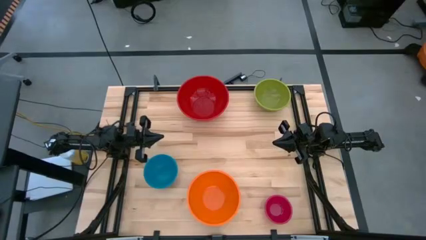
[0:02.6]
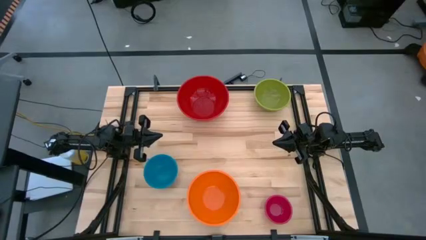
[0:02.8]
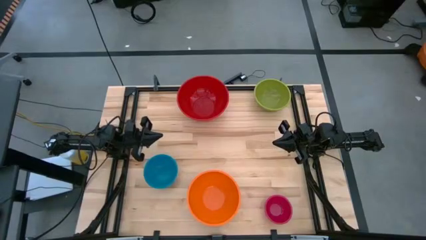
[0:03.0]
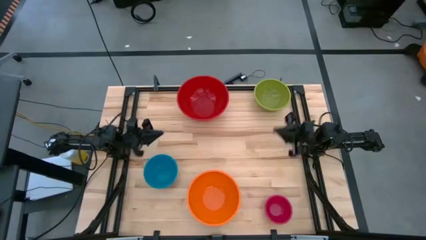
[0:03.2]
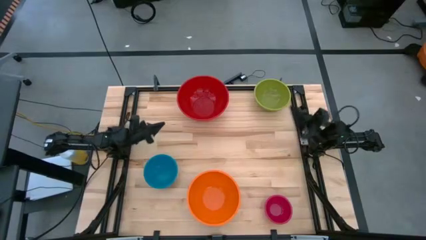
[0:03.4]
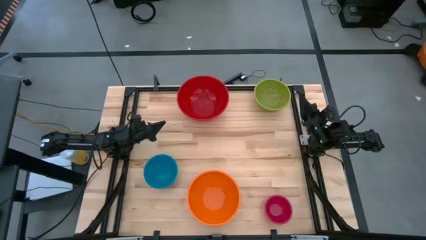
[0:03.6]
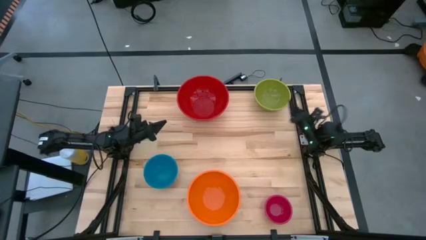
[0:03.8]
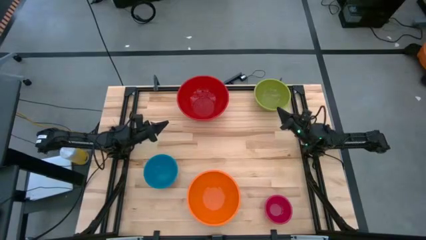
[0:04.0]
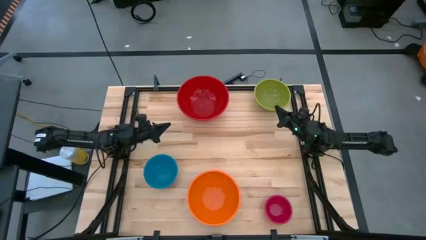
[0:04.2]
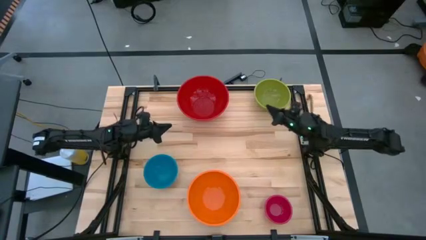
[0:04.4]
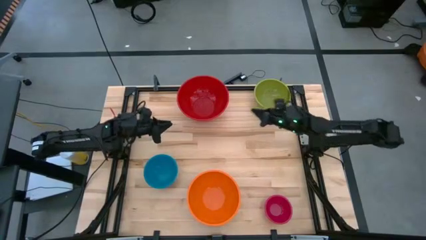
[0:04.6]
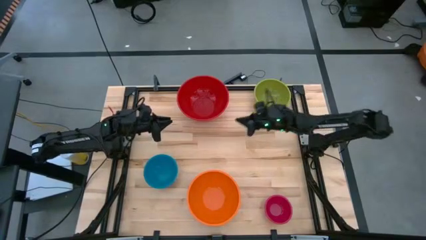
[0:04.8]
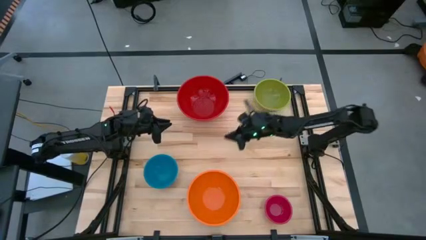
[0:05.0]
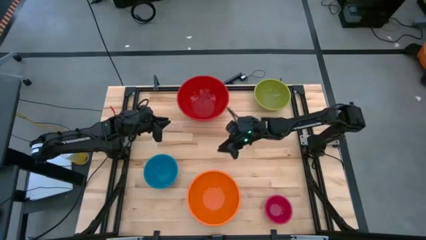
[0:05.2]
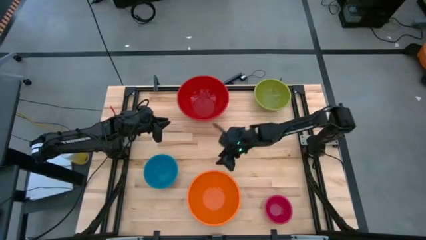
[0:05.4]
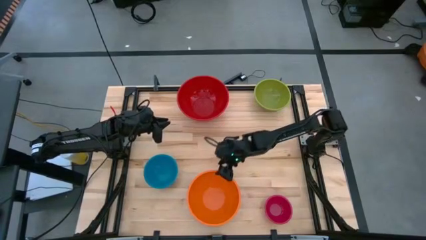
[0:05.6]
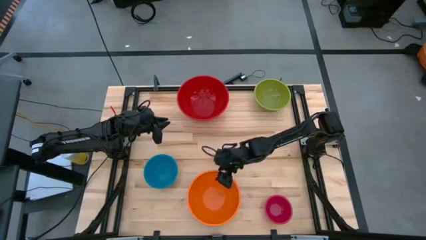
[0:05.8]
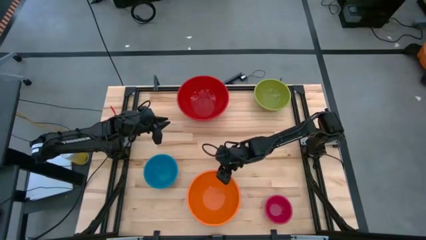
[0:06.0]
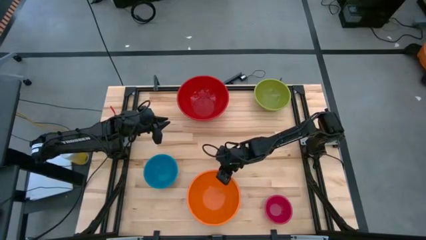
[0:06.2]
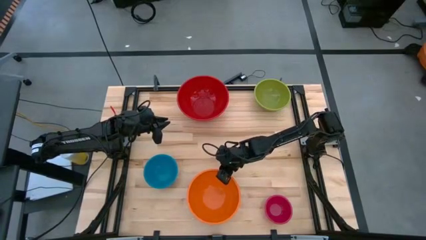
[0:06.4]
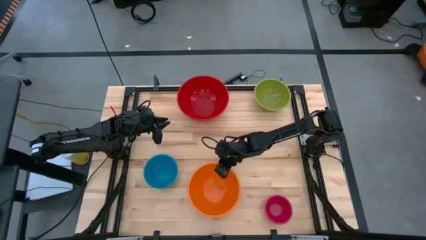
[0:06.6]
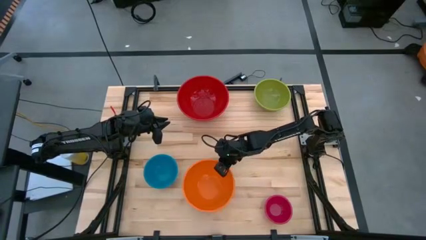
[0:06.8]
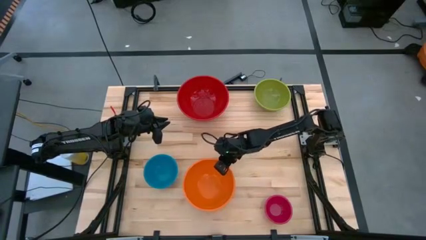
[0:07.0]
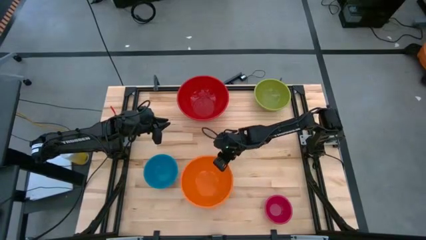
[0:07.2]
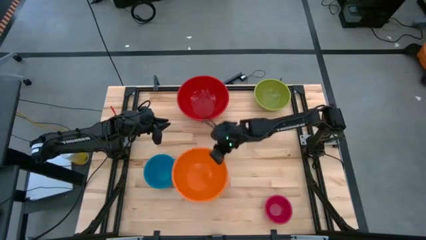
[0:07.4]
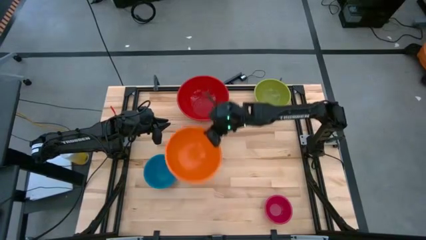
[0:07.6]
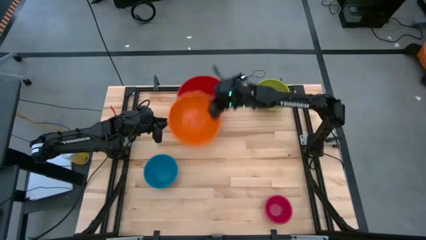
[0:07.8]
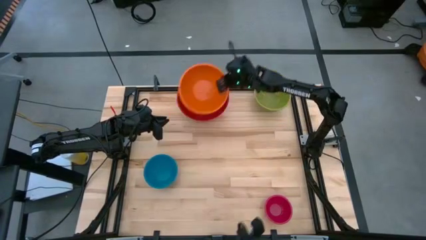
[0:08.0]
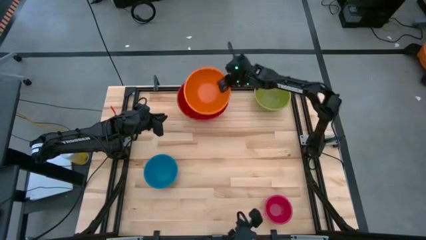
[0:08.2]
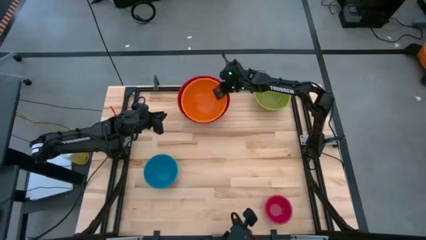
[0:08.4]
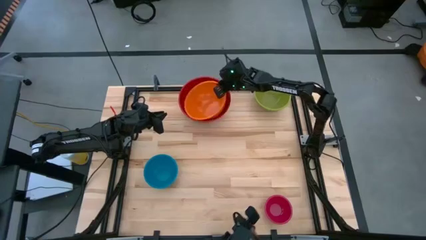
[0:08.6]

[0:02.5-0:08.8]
Stack the orange bowl on the red bowl

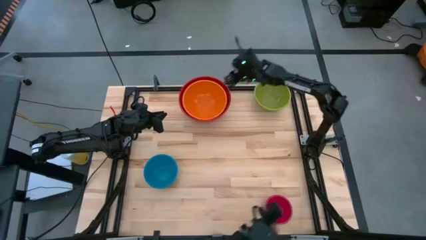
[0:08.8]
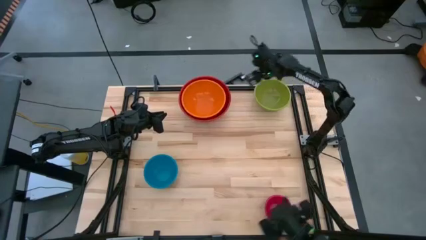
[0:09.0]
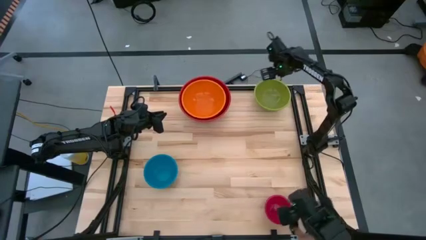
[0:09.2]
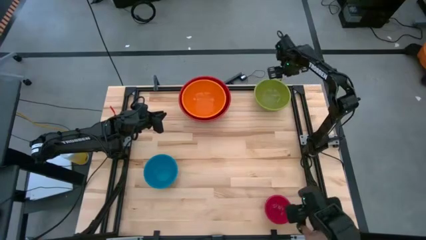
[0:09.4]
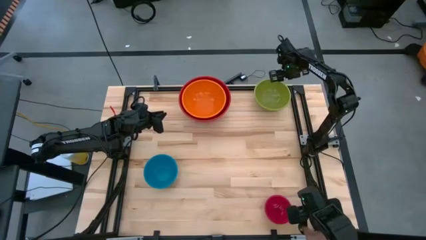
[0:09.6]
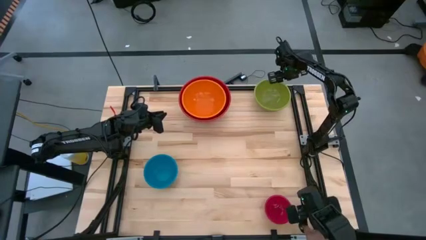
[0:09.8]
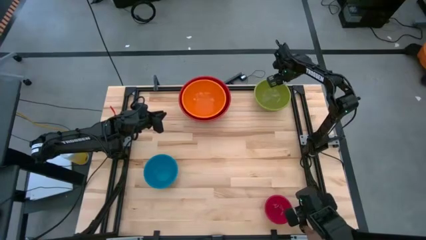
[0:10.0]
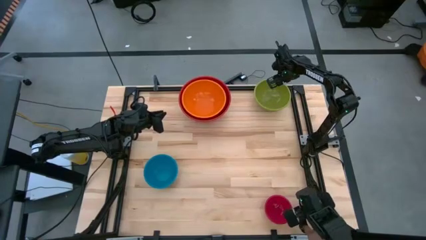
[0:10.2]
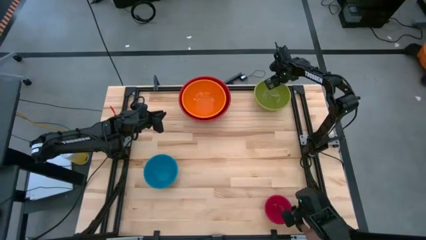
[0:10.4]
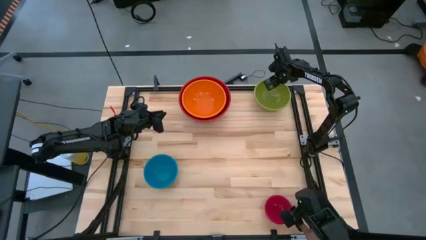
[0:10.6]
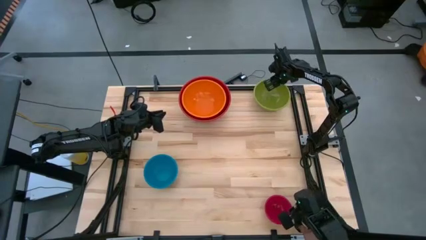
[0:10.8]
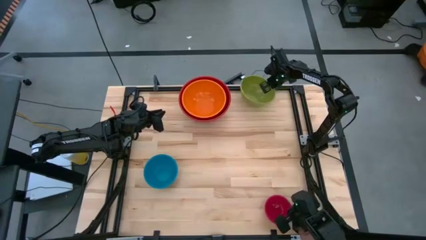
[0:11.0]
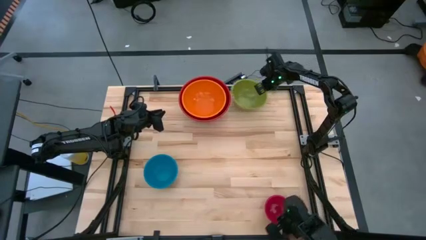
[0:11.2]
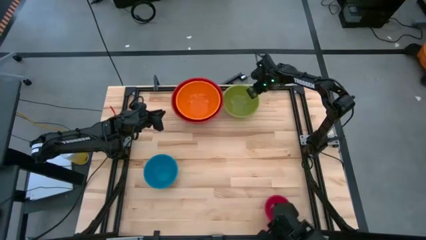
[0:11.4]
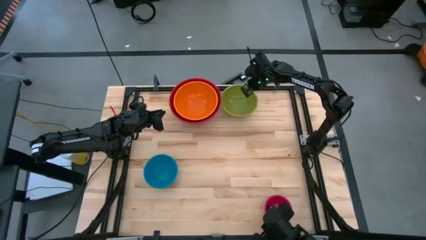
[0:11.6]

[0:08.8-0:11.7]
Stack the green bowl on the orange bowl

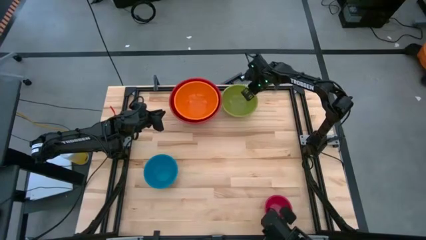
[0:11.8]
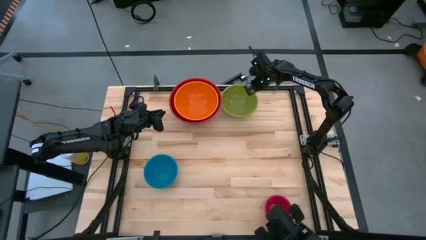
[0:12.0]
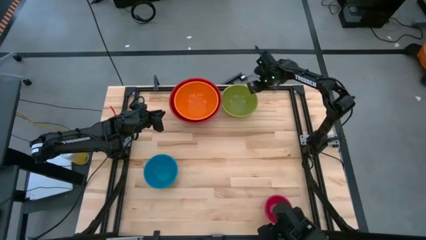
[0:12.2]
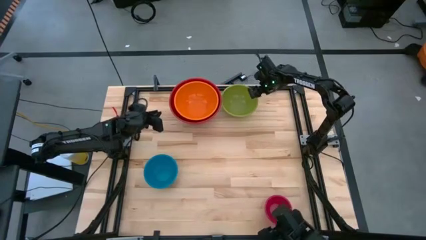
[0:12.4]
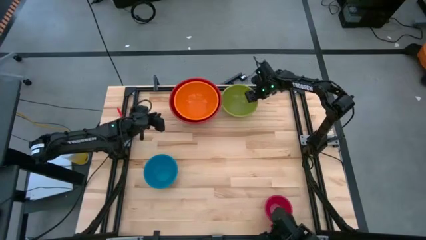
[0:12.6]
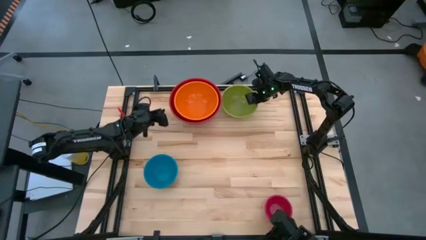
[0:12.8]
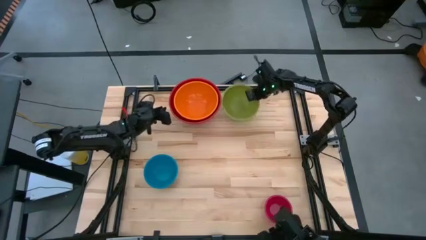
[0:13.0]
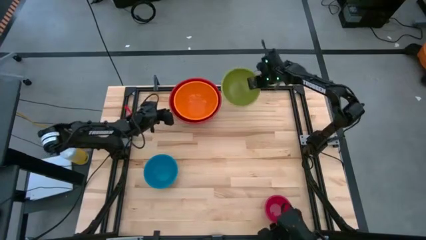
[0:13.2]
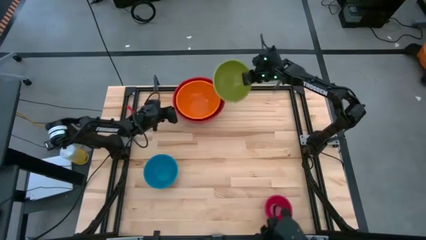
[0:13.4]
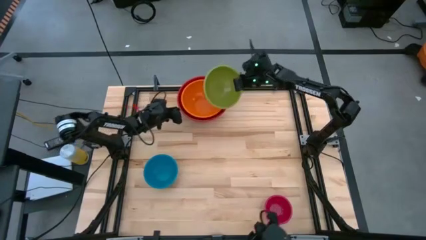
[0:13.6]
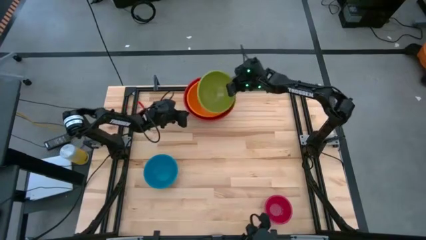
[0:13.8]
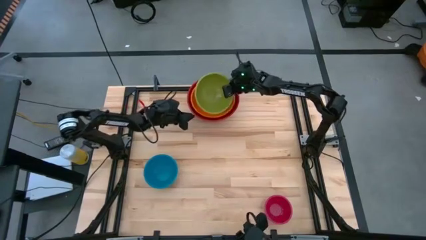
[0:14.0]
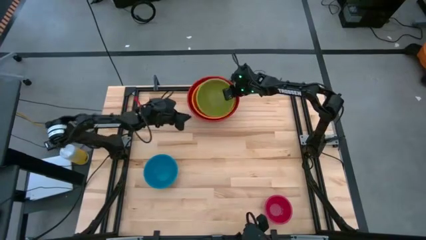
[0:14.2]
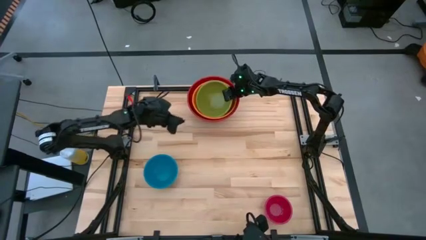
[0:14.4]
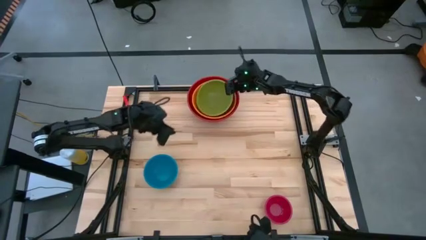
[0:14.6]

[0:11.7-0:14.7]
Stack the green bowl on the orange bowl

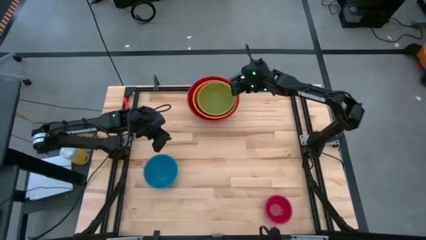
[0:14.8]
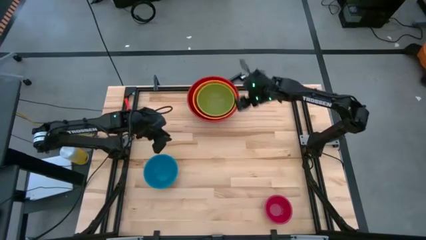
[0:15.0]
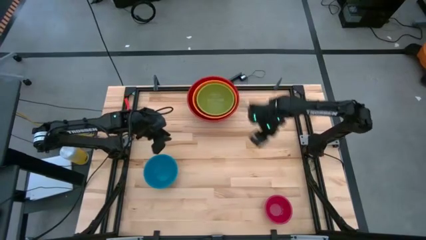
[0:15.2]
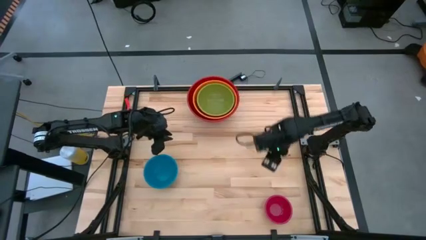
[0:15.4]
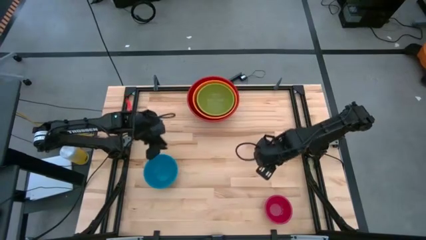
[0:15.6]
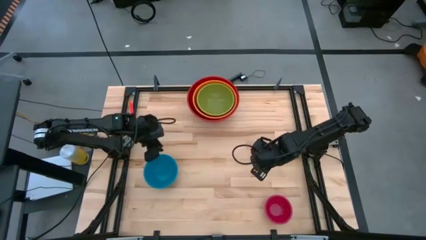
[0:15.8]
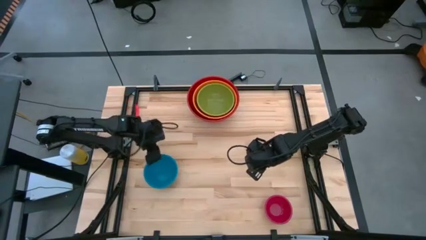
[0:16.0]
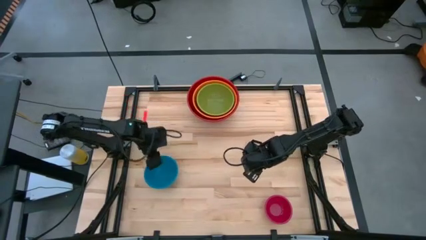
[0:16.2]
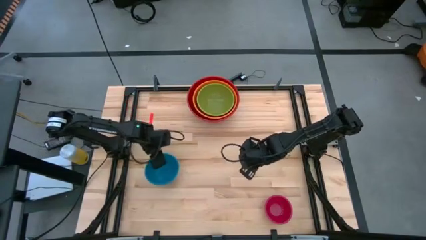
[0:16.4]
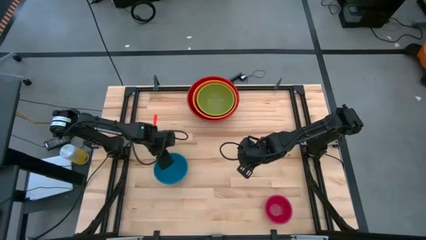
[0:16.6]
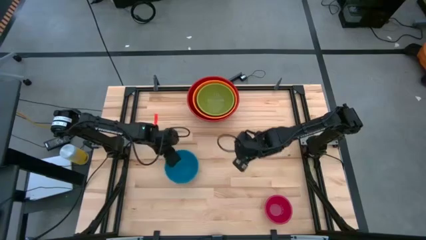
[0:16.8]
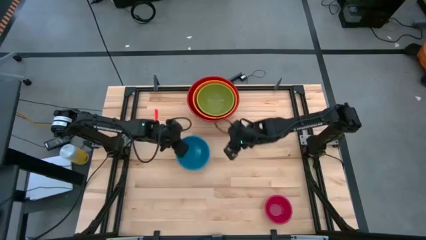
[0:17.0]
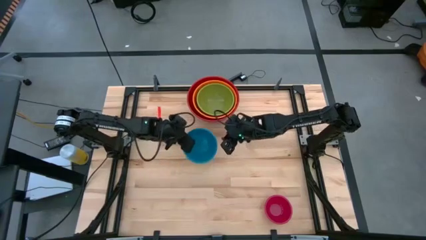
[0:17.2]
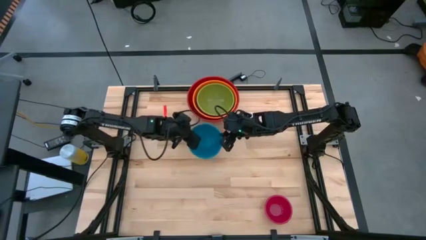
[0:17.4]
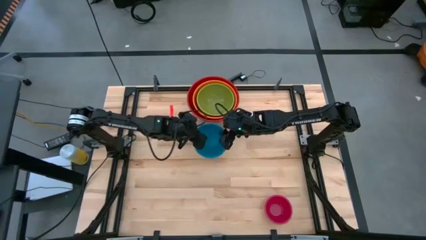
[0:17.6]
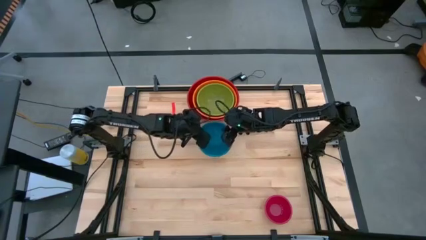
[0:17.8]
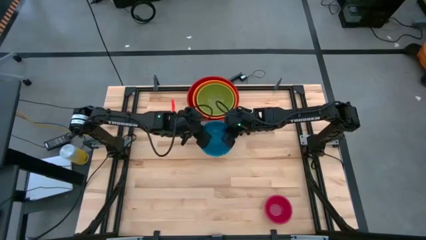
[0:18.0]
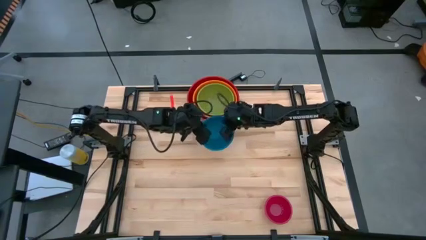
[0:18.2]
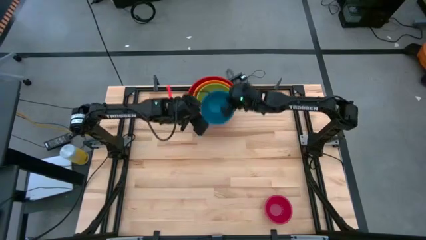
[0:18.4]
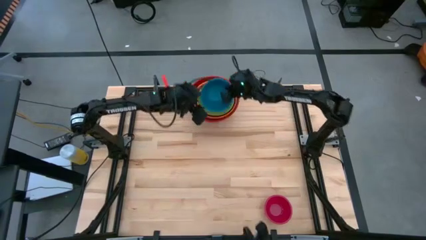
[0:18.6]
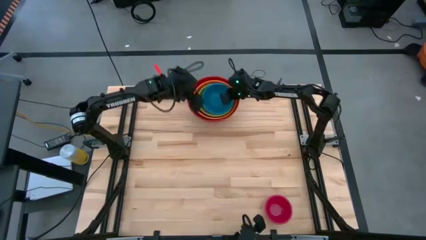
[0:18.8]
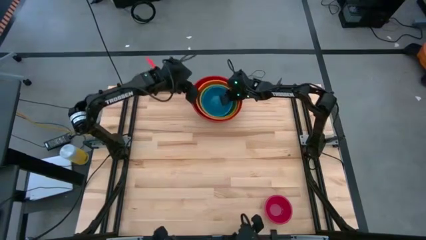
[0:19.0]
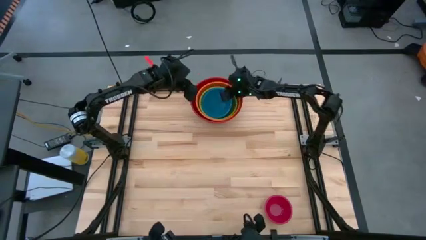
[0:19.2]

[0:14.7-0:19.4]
Stack the blue bowl on the green bowl
